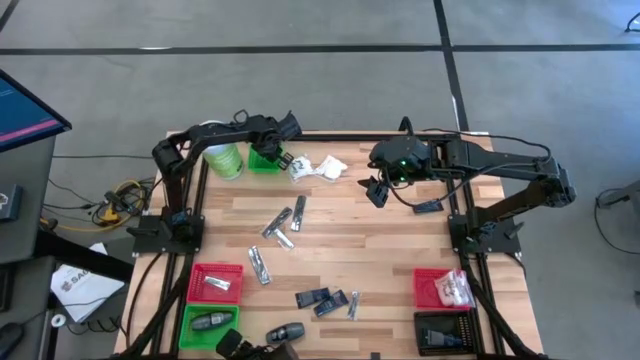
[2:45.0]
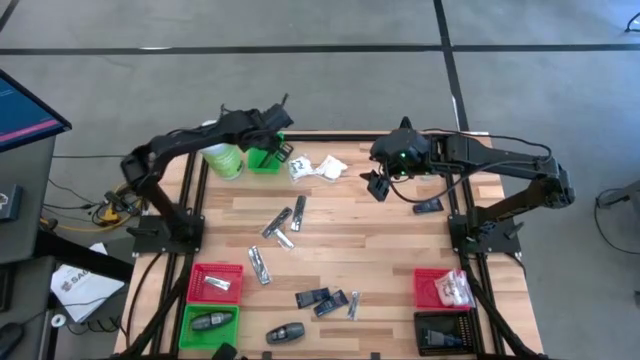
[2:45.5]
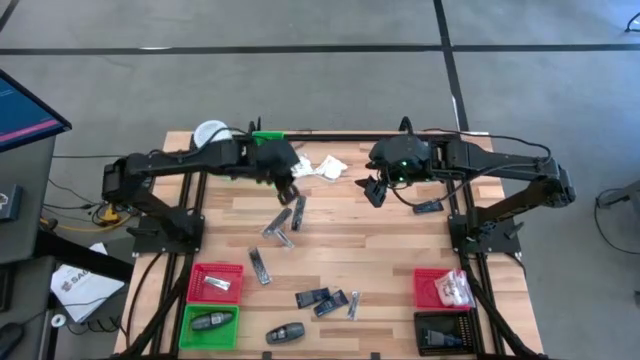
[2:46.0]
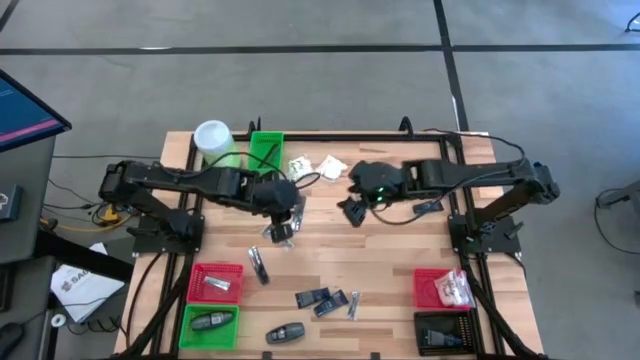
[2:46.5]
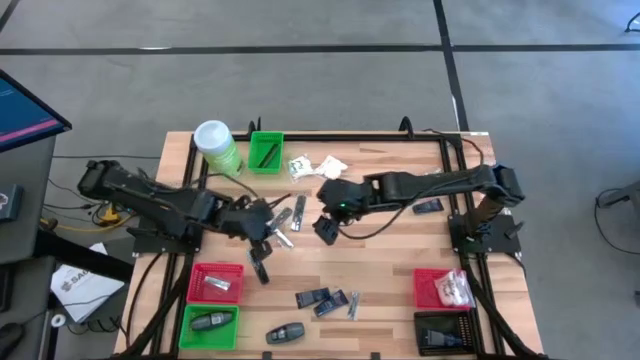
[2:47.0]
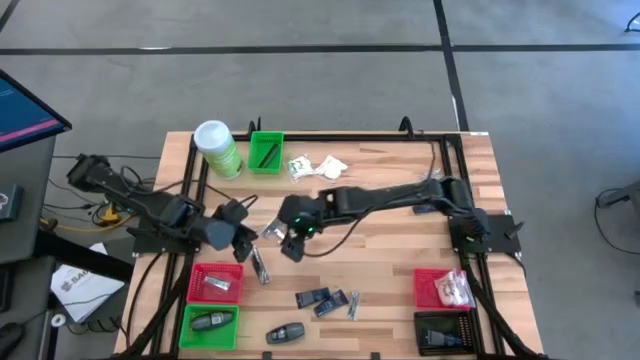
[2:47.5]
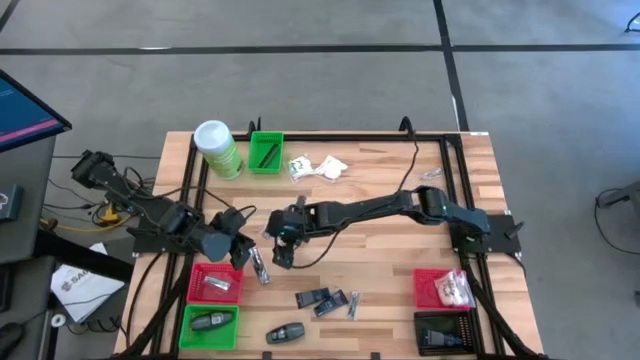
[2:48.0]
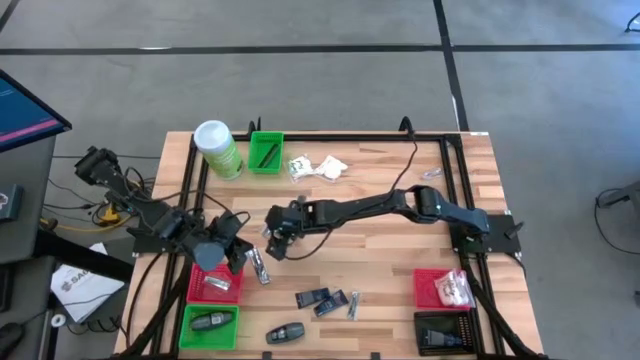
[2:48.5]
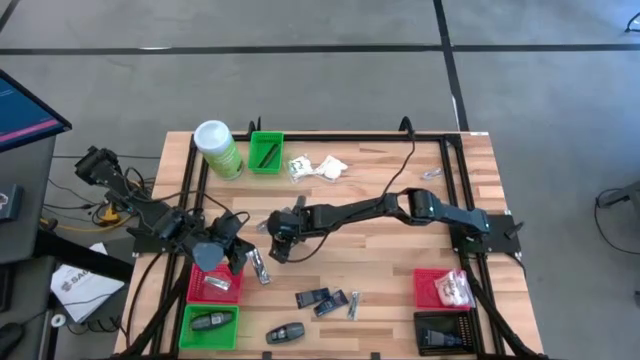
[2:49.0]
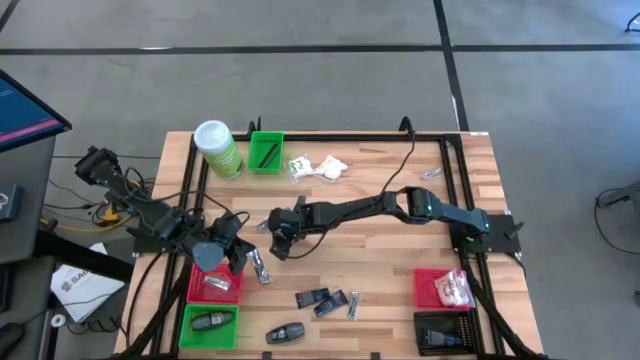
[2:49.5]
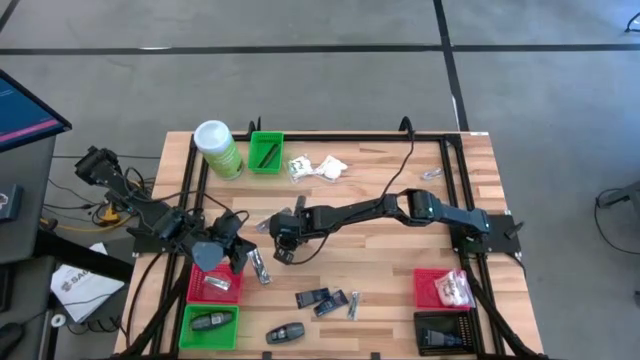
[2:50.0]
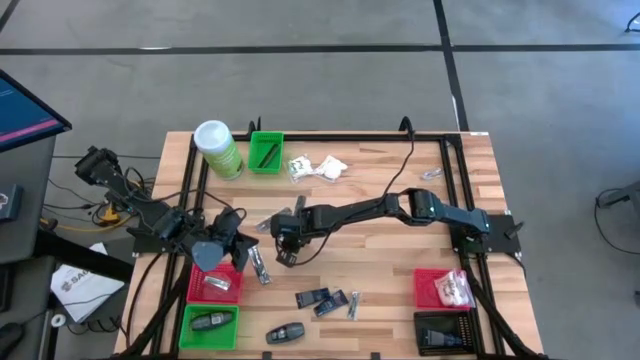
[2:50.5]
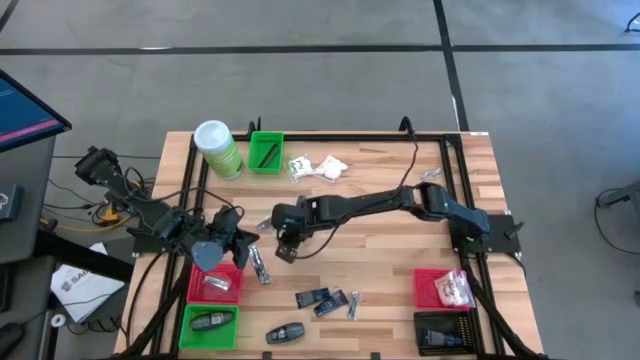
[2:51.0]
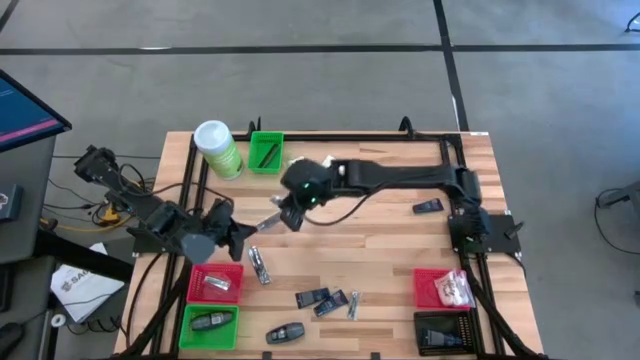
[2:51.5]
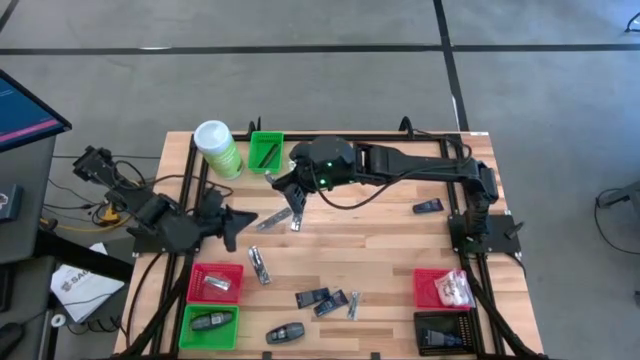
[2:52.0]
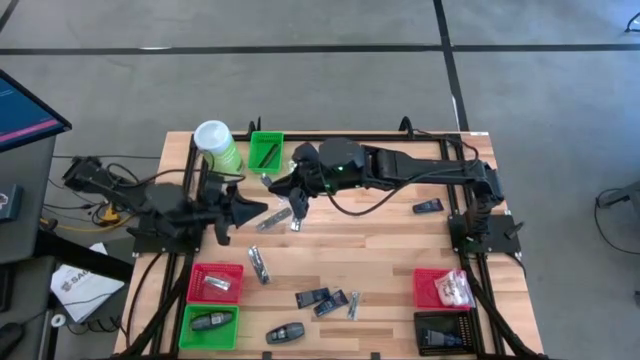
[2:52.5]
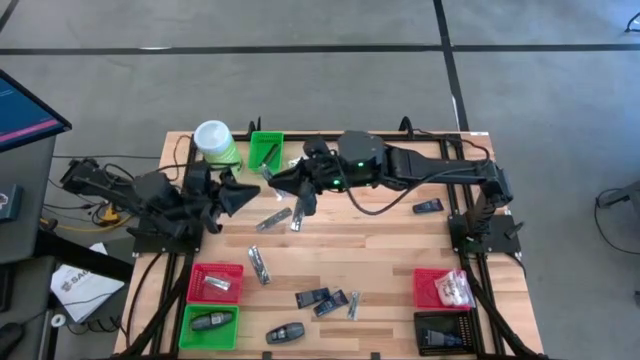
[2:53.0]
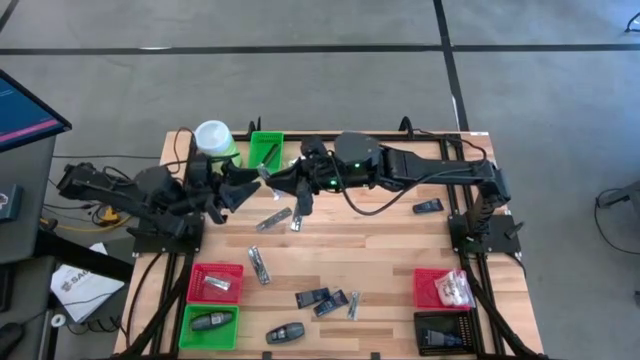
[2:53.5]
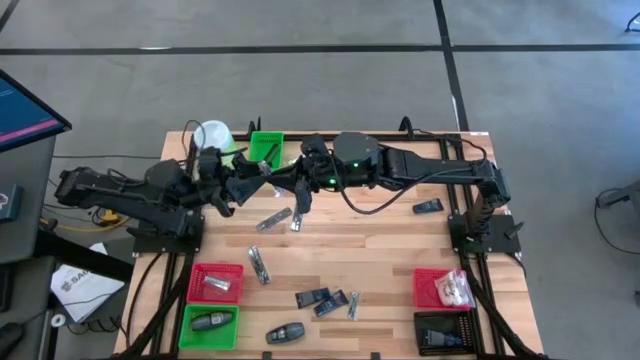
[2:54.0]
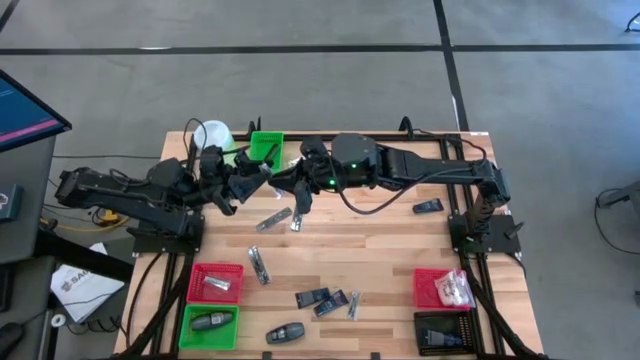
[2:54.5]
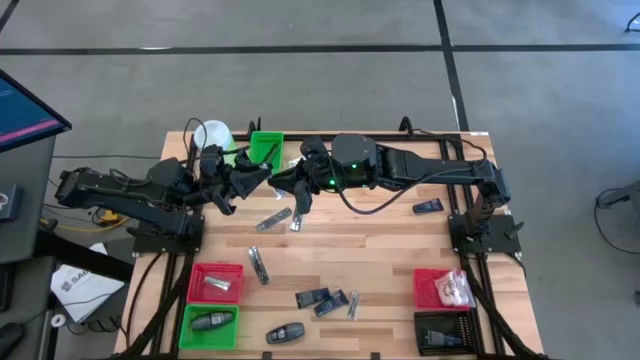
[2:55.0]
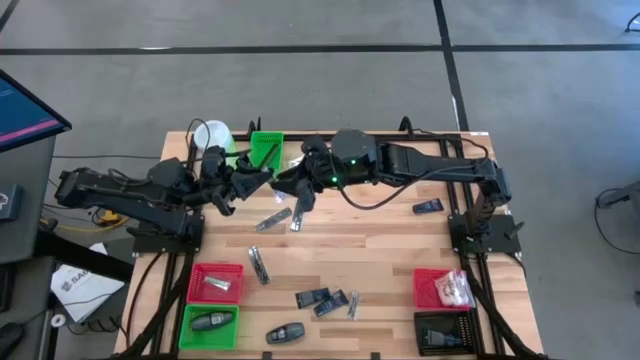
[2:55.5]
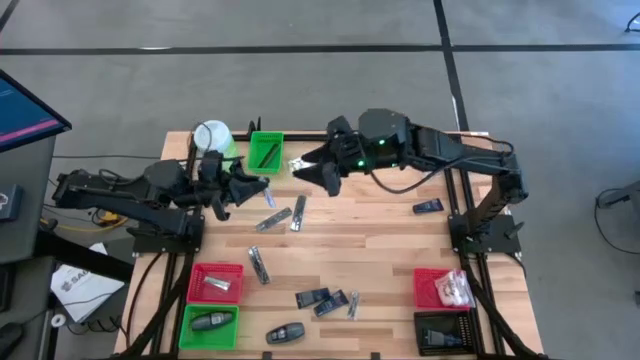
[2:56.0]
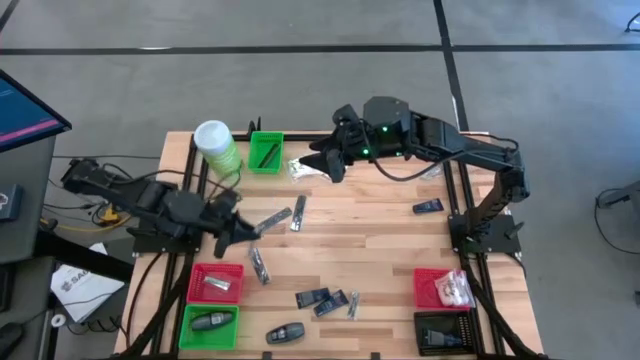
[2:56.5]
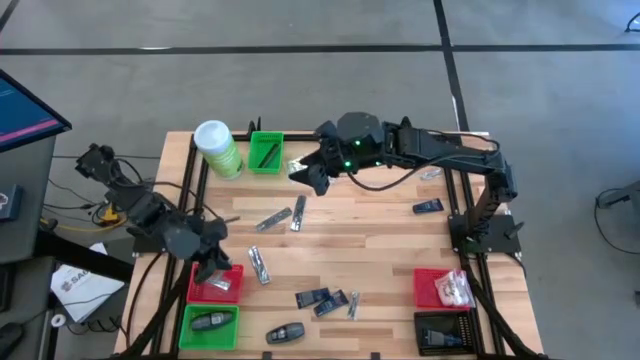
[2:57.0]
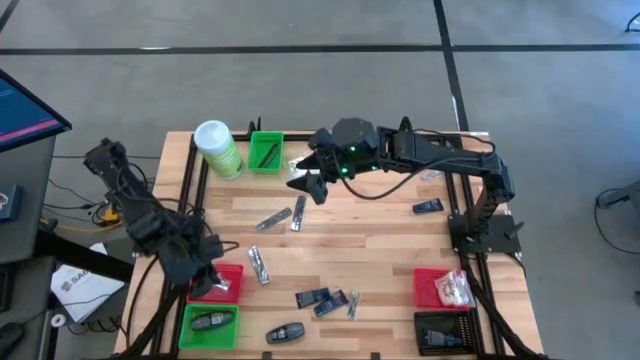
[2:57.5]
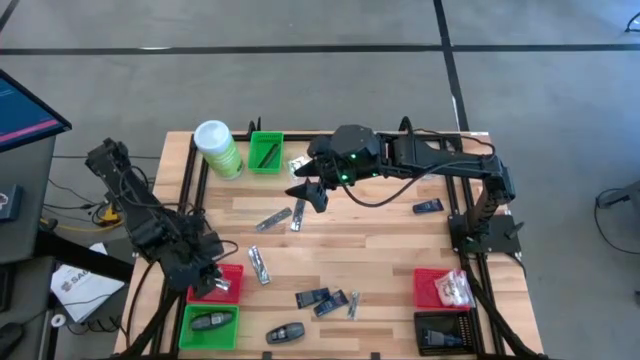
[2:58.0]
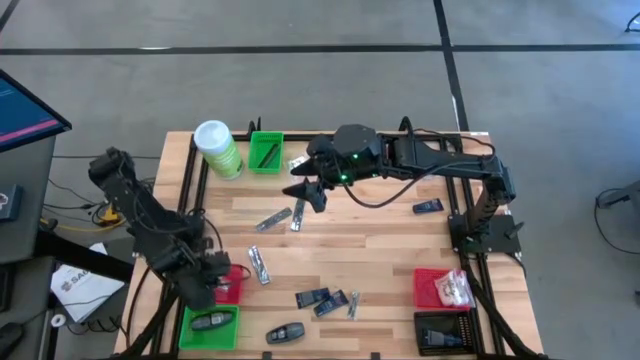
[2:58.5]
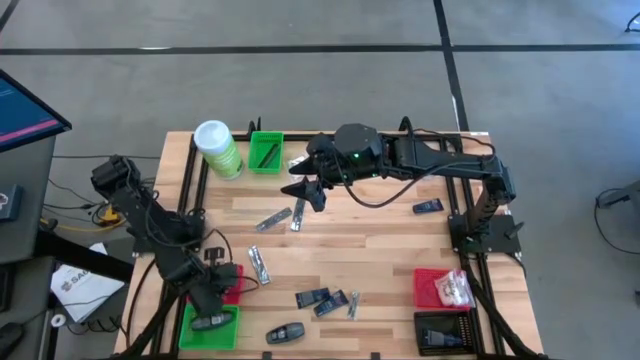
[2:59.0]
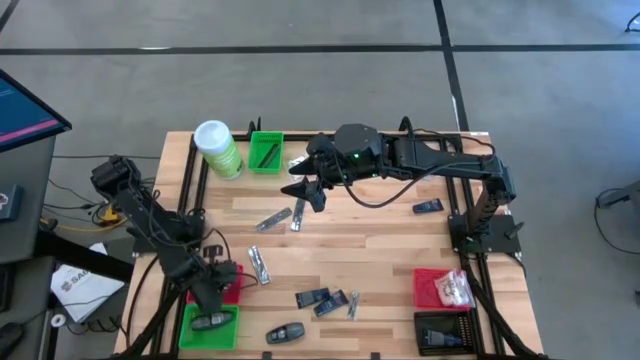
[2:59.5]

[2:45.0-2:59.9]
Task: Pick & Place Travel size toiletries
Put the nail cutter into the left red bin

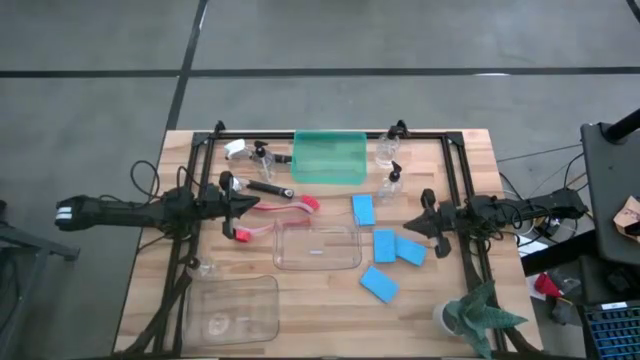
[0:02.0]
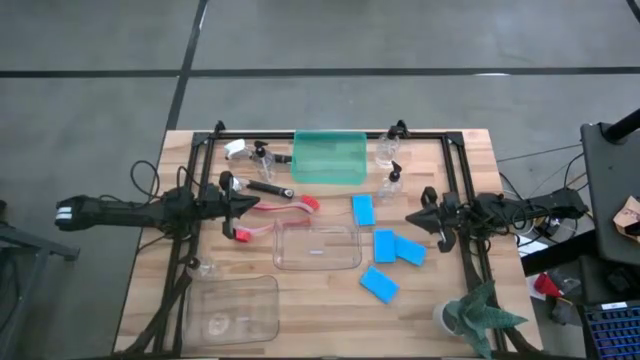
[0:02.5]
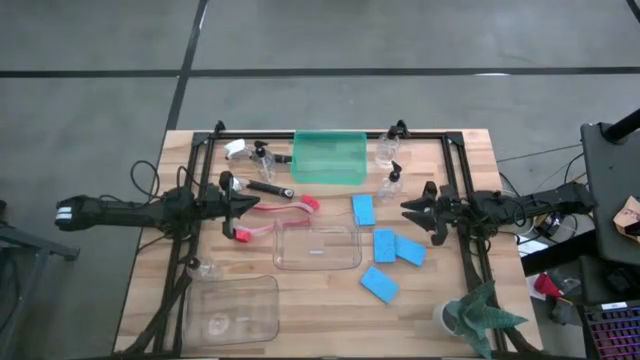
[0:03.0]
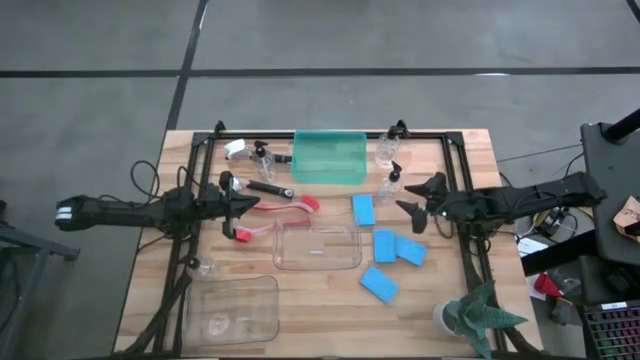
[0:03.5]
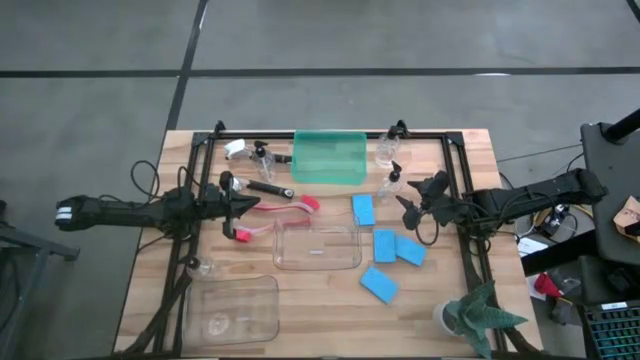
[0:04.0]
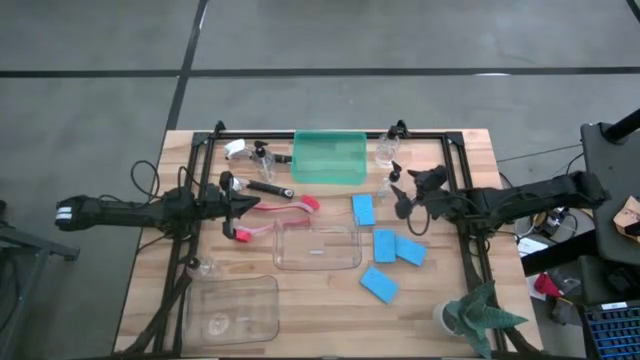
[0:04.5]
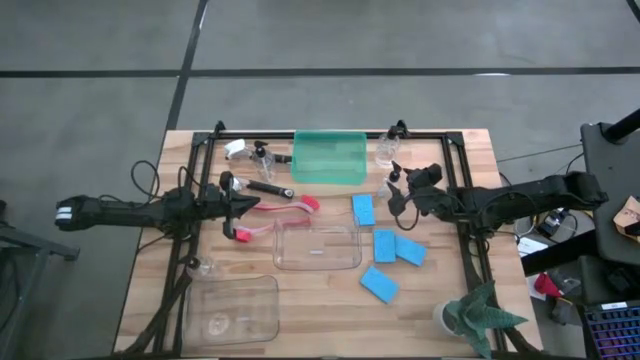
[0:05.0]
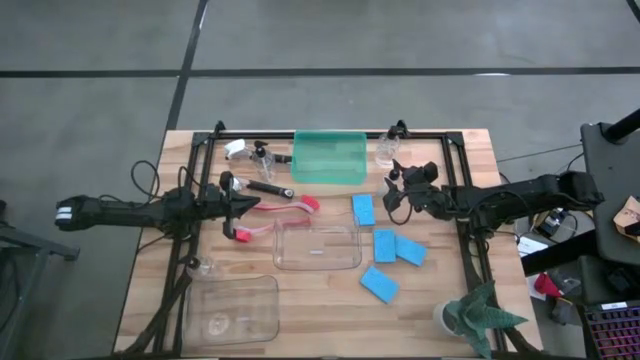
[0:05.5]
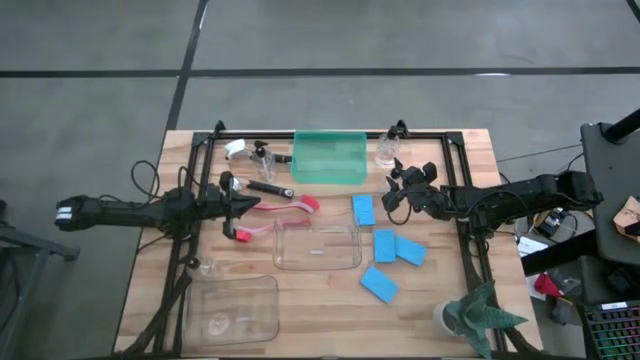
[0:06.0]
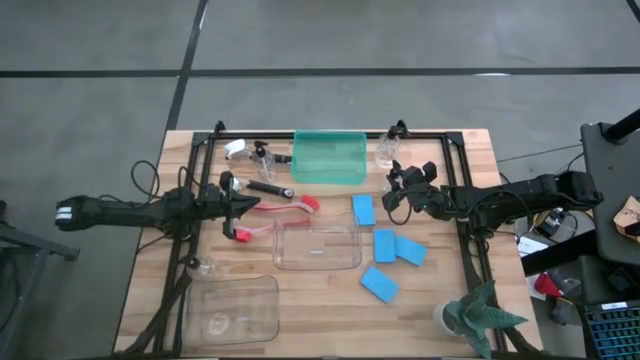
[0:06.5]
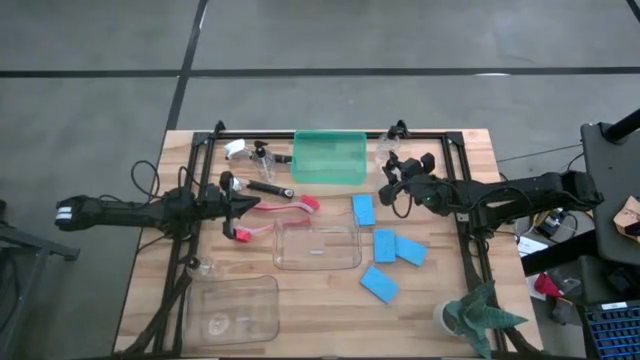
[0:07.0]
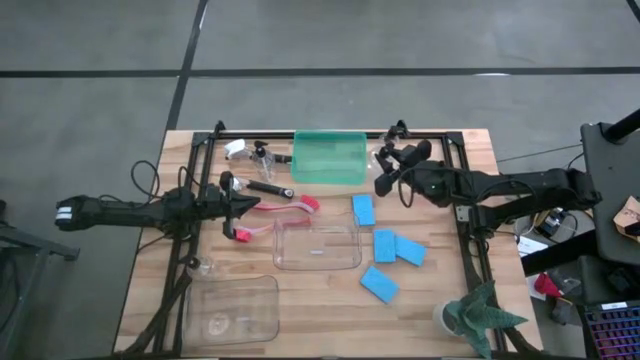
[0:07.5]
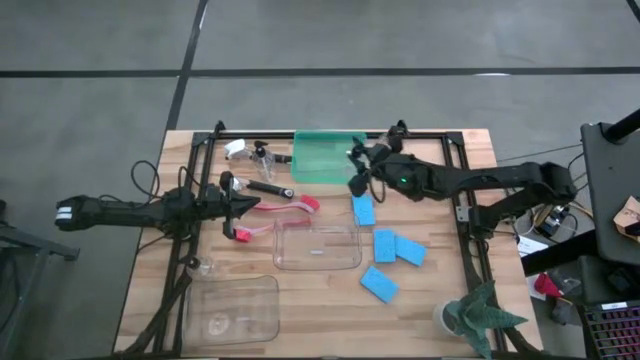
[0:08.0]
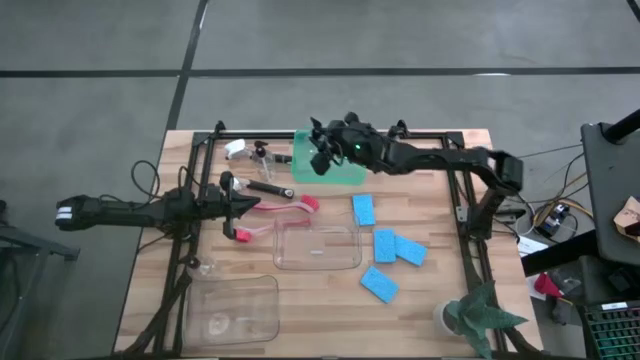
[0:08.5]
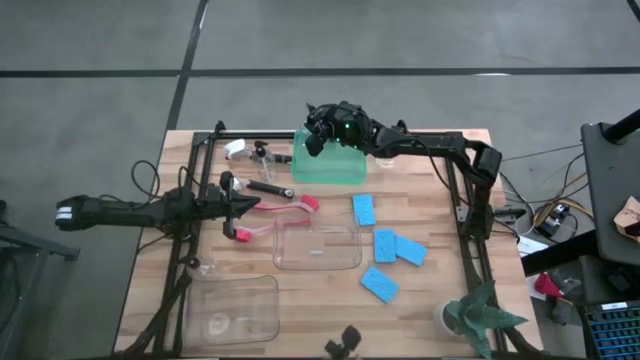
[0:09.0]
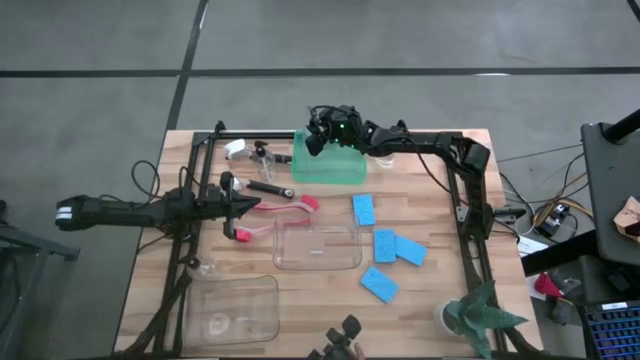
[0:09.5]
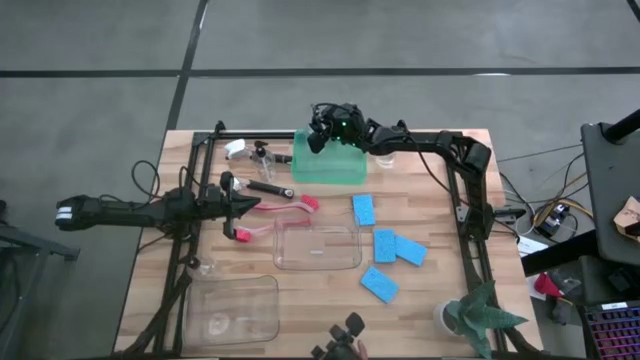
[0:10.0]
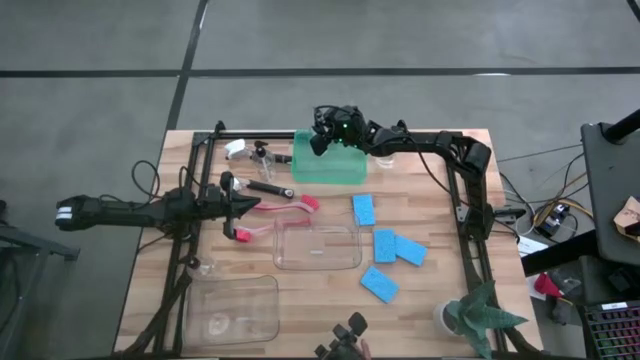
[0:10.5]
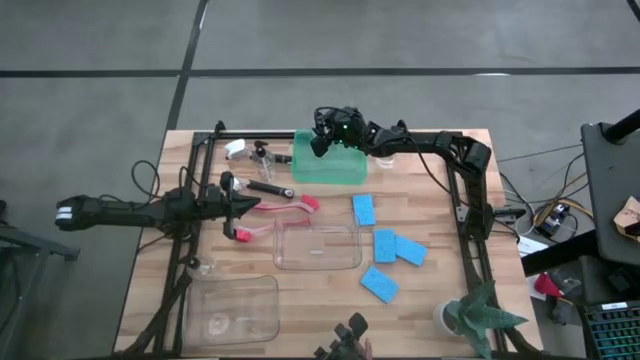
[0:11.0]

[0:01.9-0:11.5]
Task: Pick & Place Kitchen Sink Supplies
Put the transparent soap dispenser into the green bin
